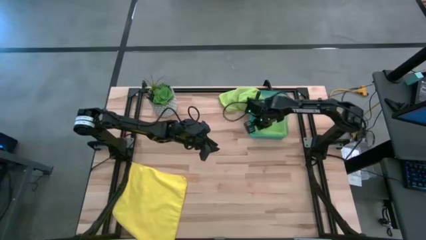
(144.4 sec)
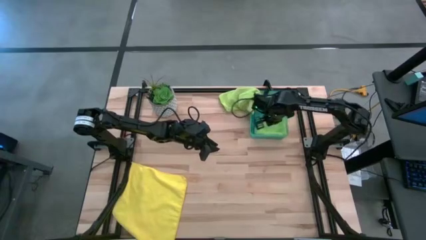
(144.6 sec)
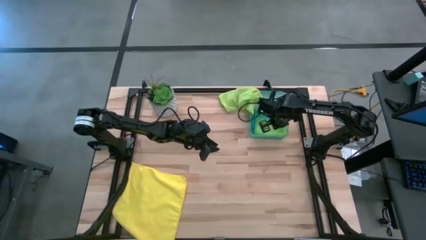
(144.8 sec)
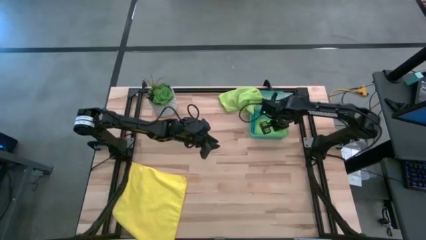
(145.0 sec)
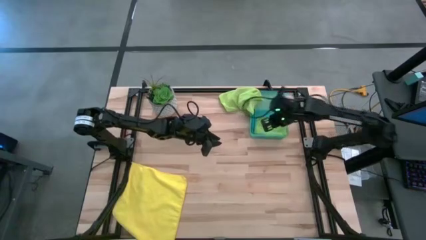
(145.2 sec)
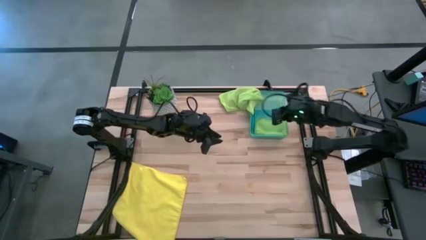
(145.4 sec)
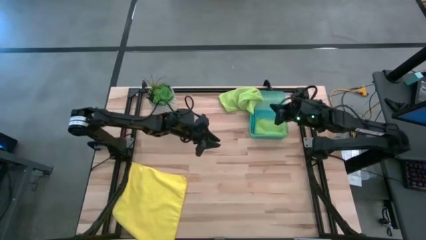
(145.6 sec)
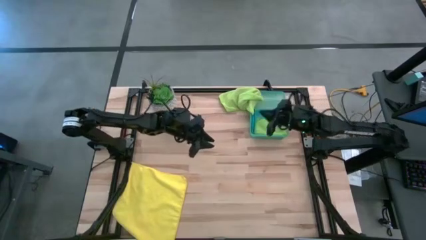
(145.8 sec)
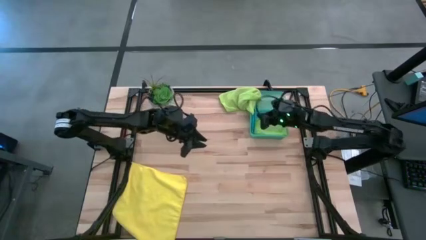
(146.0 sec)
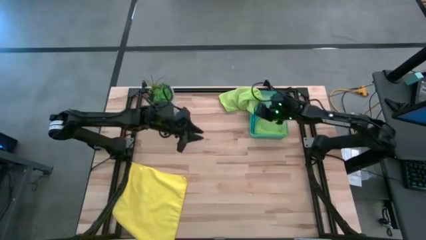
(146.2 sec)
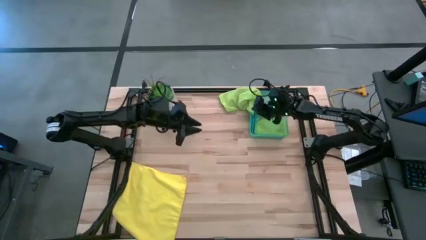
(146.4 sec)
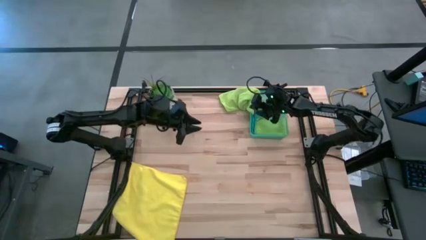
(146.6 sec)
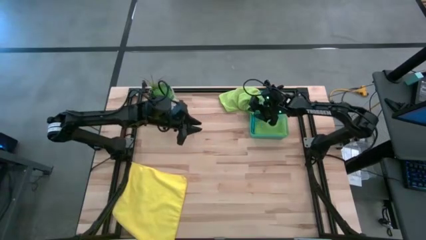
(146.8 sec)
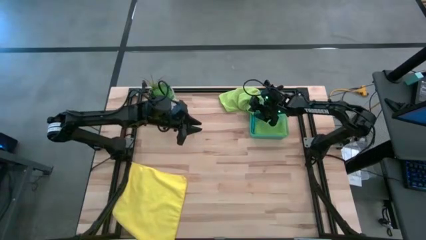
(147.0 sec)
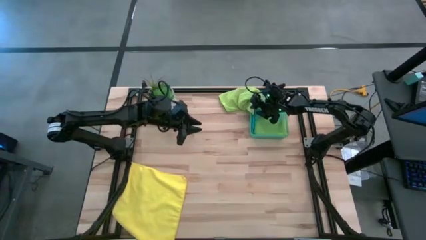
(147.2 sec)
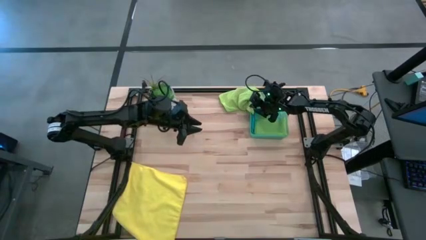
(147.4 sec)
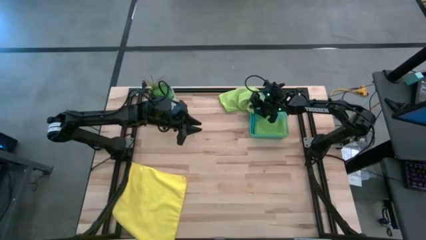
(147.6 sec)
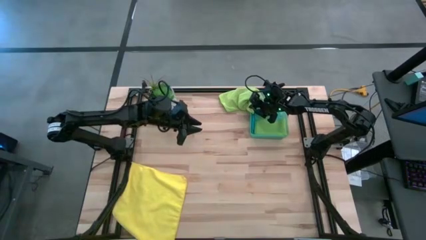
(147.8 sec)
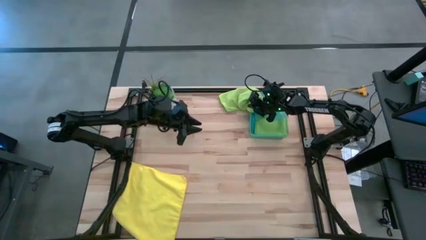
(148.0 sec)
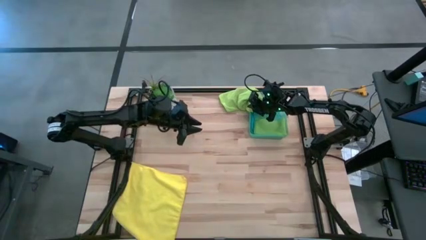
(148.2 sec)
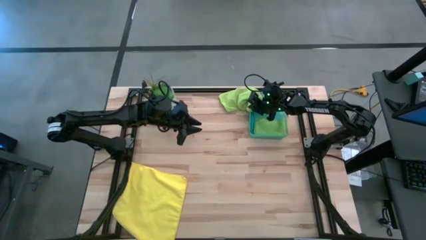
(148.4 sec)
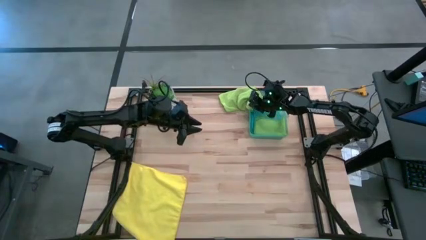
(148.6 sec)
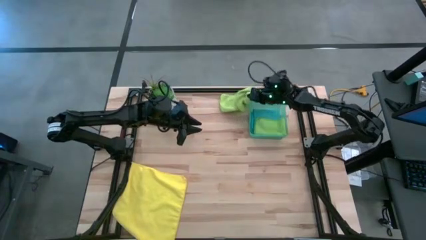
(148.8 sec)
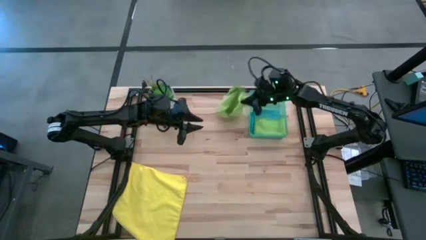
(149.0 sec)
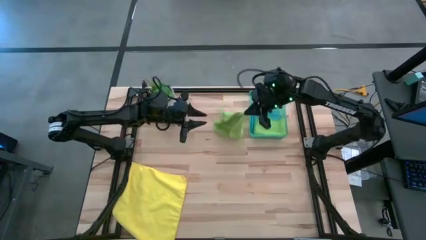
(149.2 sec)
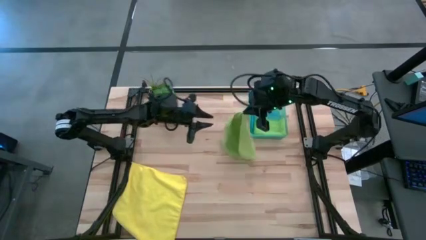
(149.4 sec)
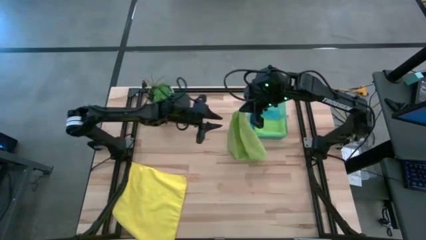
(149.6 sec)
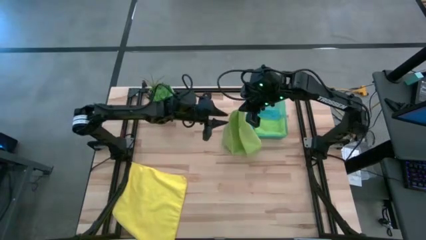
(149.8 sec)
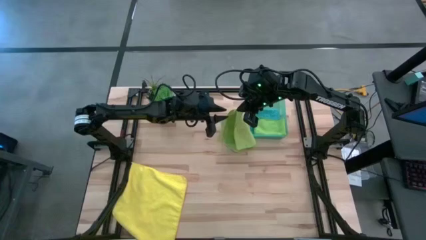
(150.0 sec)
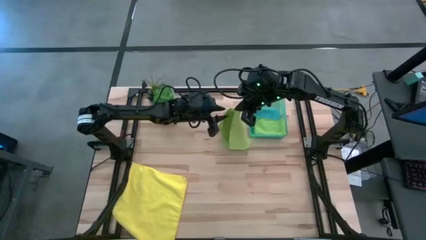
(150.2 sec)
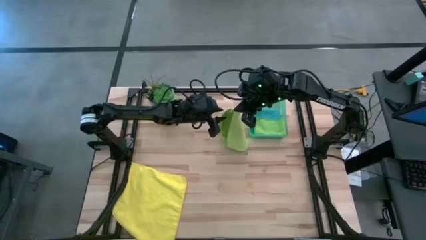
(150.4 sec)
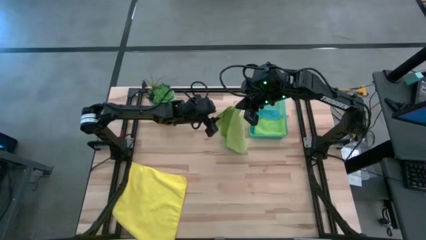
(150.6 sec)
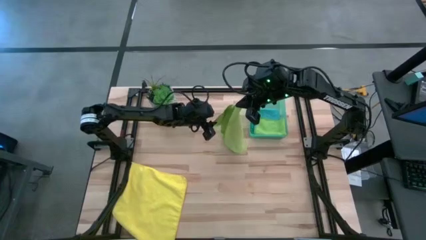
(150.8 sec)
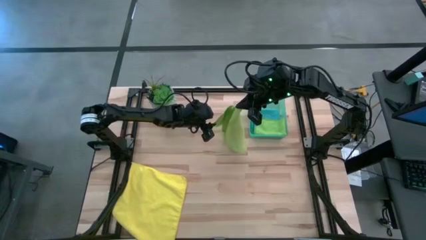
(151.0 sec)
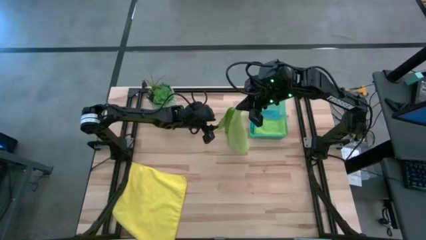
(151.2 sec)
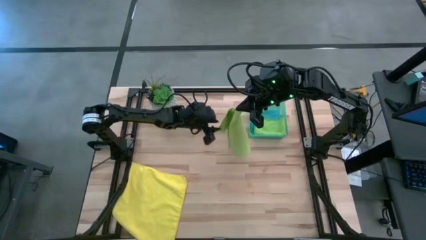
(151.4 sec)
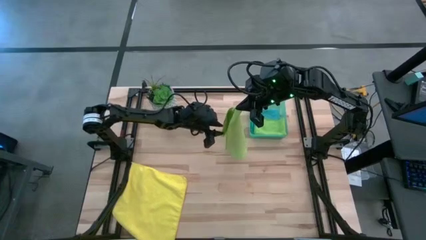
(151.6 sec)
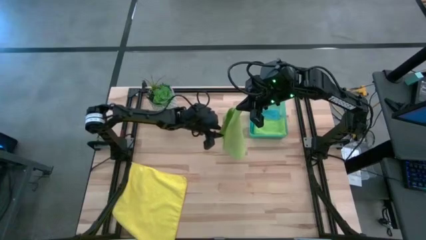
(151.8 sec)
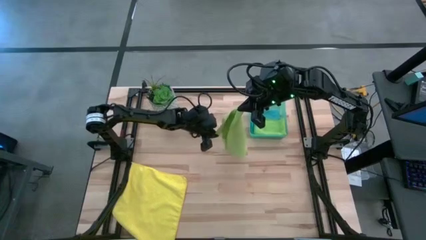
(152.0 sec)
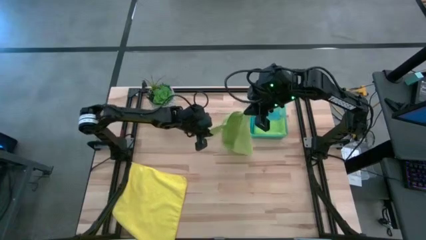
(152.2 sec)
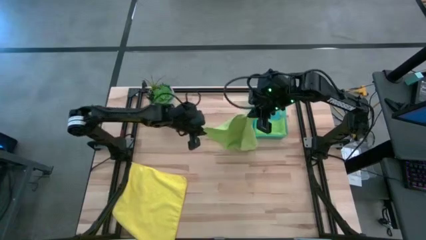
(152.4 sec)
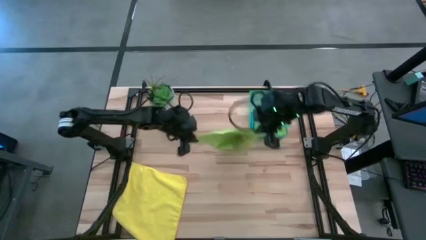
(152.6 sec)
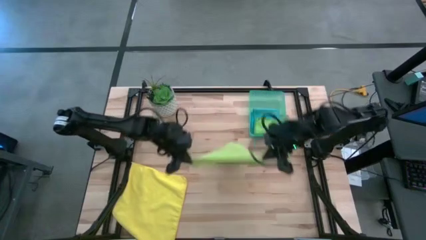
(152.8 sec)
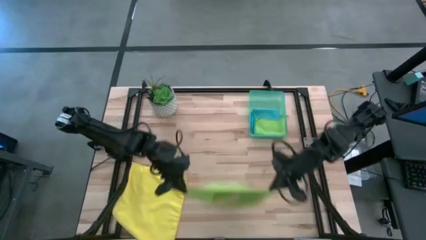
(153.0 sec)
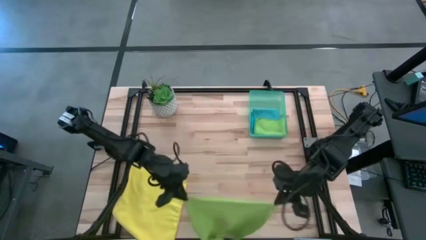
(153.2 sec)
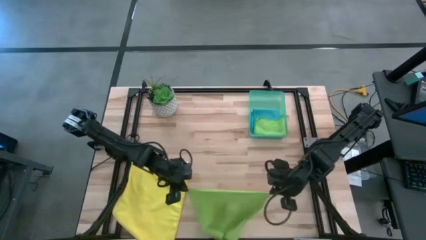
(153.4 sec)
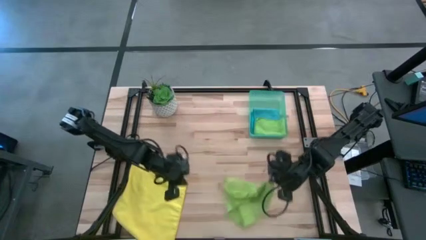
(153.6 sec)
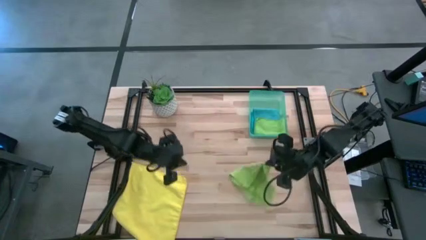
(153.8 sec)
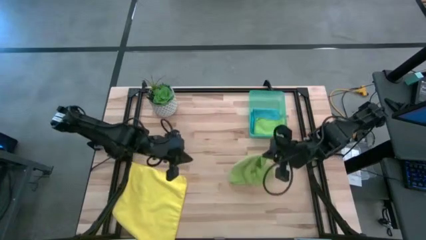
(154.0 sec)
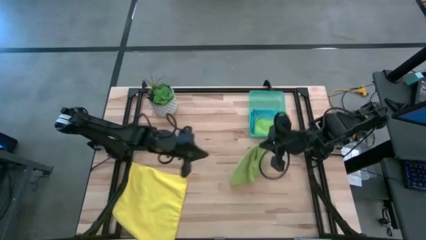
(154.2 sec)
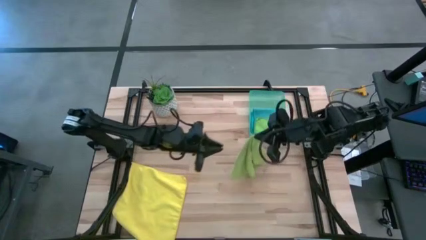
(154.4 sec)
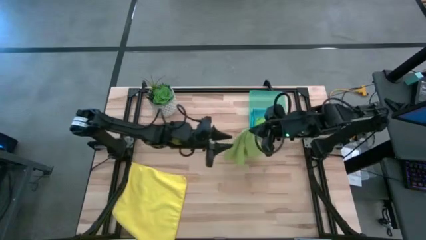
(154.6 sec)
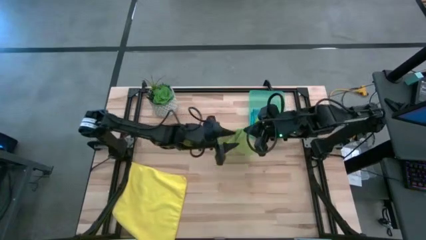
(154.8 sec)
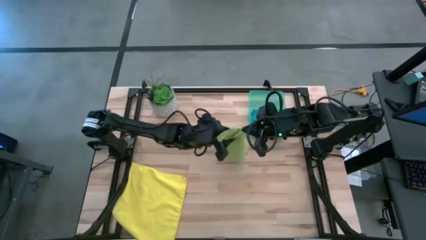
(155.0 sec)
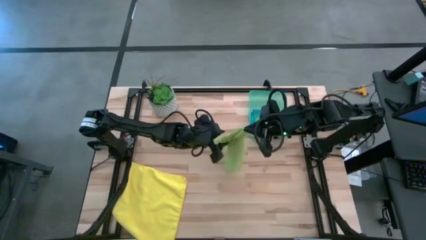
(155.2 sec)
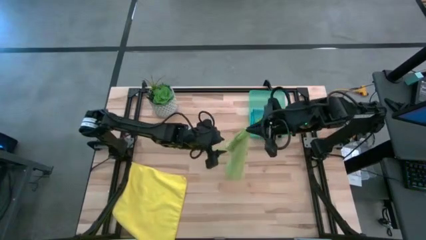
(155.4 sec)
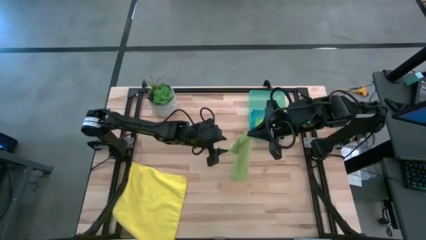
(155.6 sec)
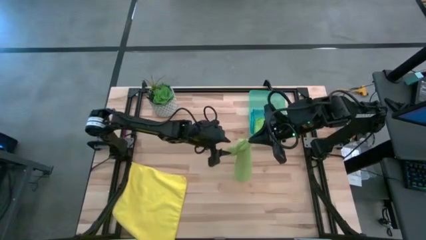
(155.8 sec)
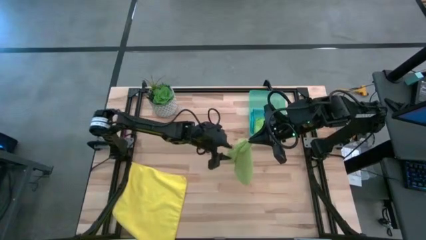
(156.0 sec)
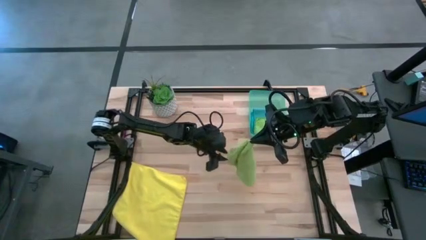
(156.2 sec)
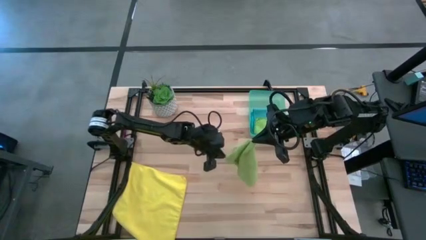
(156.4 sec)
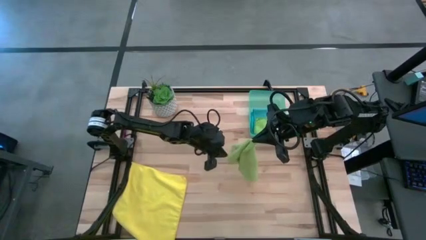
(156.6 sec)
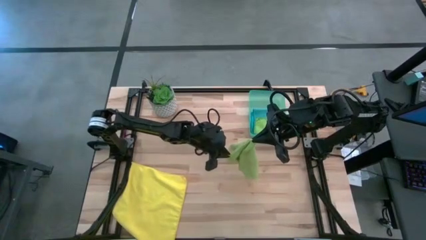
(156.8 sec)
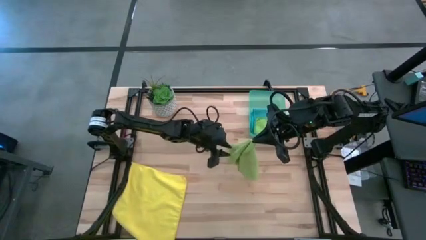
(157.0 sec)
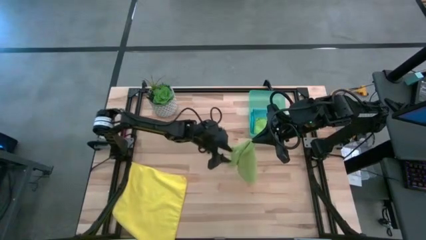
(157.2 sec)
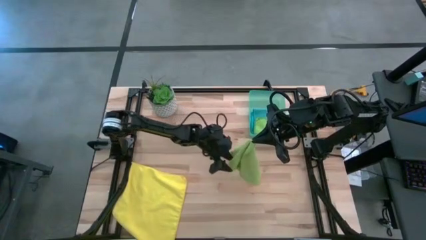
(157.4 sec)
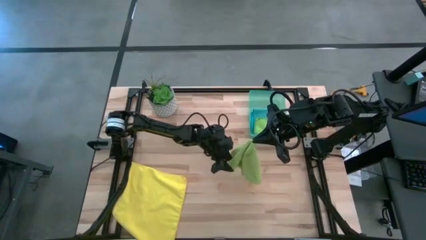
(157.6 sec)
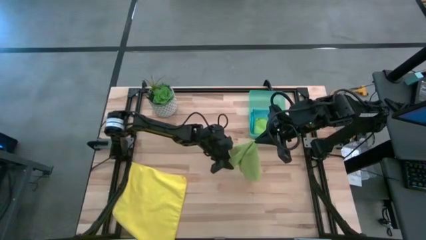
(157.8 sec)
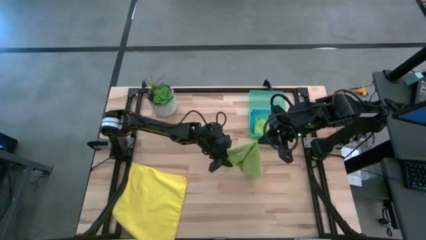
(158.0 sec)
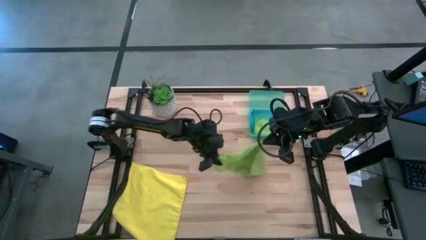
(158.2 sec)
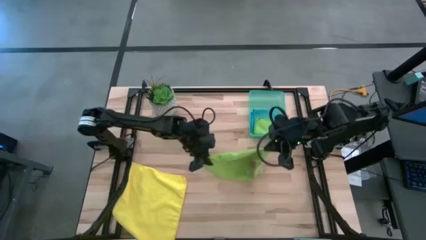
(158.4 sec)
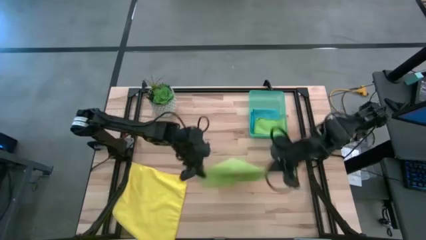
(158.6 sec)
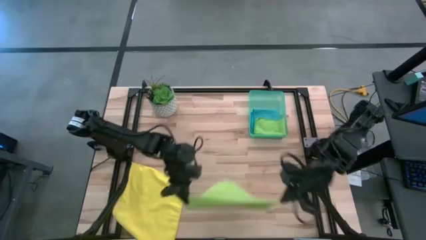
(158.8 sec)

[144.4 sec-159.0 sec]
Task: Fold microfiber towels
Fold the light green towel

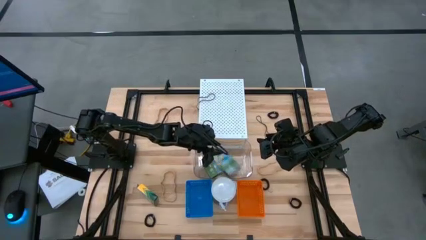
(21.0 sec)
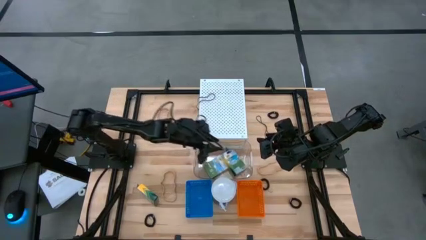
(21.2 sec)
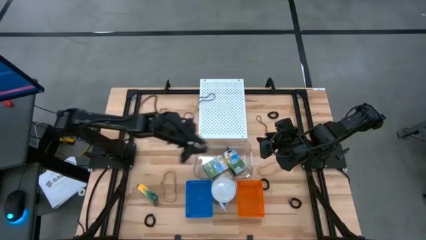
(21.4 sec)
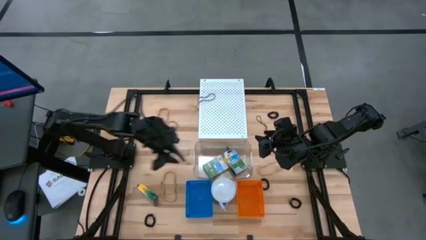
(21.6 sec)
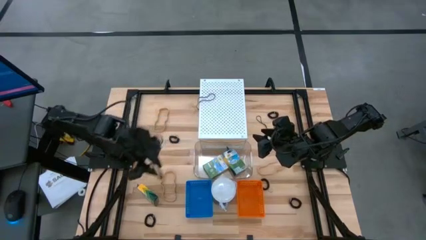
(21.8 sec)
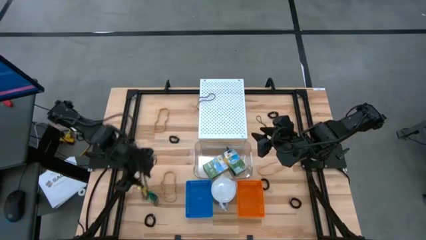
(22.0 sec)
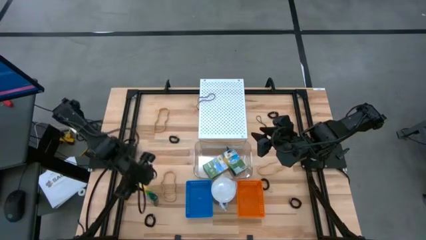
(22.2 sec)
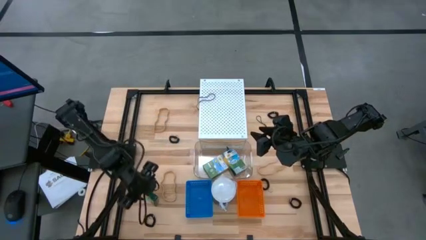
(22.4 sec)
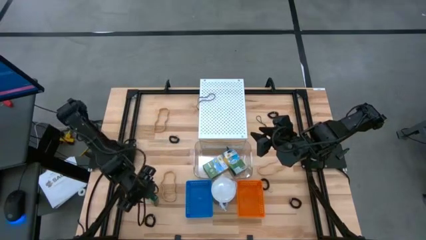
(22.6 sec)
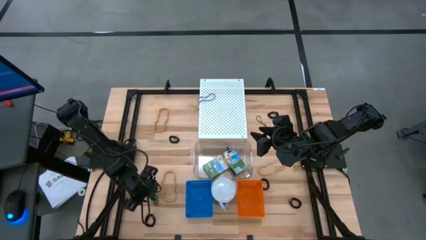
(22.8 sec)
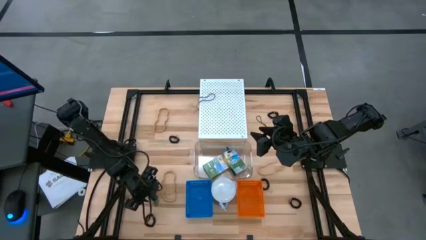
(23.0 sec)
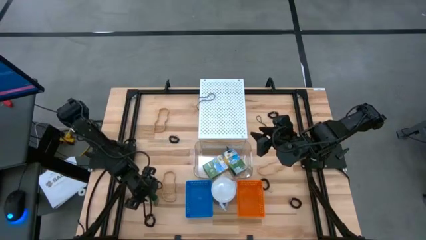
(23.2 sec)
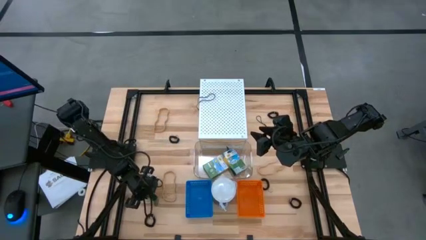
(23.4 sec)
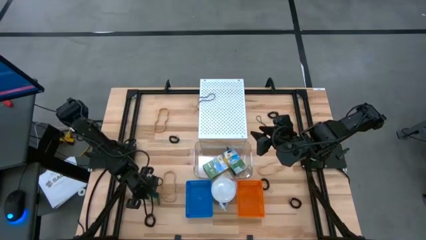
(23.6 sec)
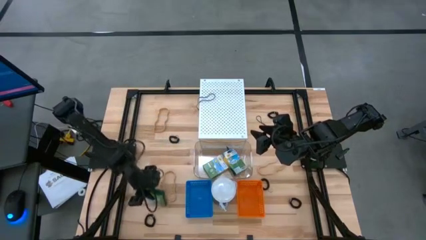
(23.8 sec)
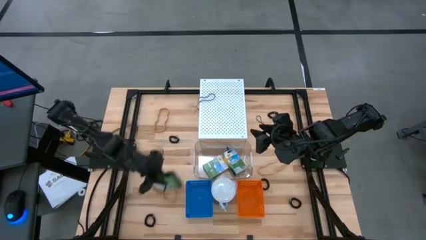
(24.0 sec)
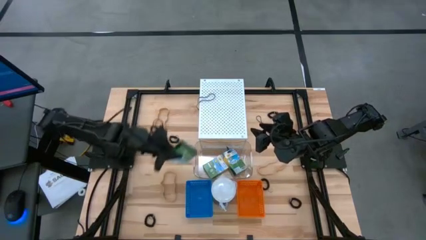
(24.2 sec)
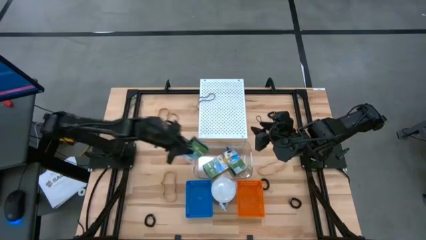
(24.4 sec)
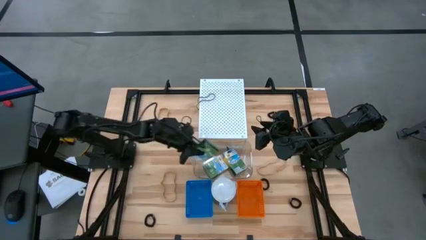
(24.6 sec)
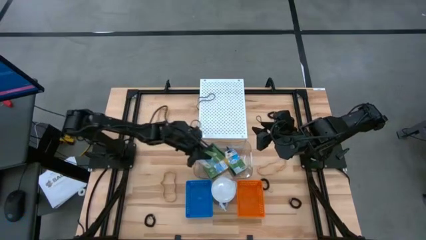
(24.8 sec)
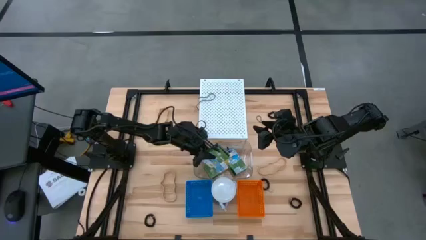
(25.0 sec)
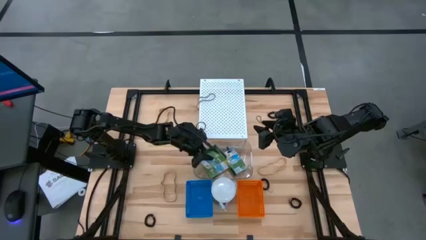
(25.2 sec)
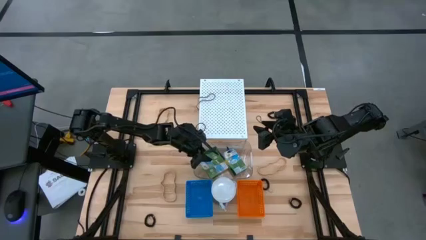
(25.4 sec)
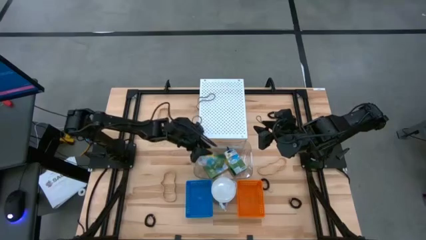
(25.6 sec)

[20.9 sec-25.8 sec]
Task: Pick & Place Office Desk Supplies
Put the crayon box into the transparent bin
